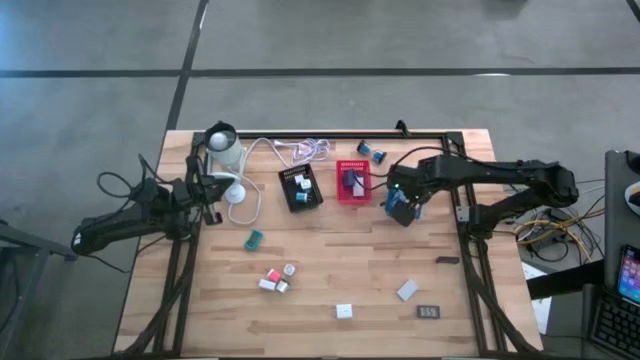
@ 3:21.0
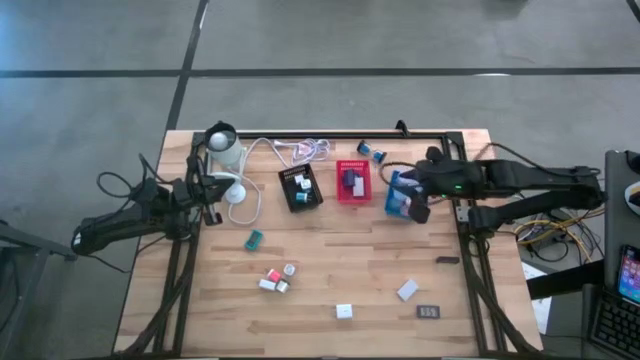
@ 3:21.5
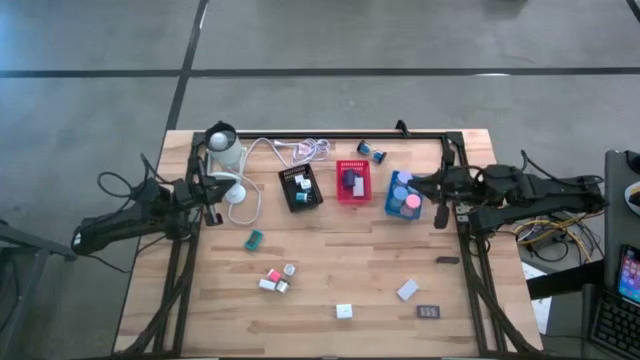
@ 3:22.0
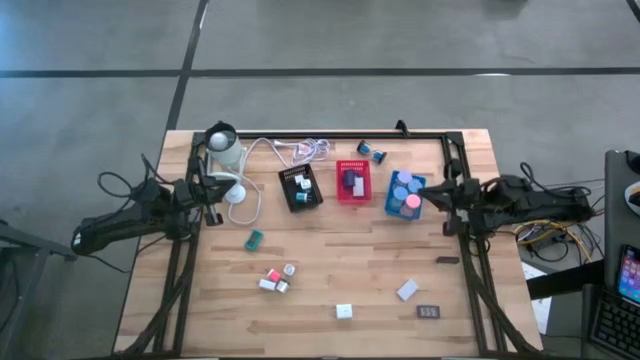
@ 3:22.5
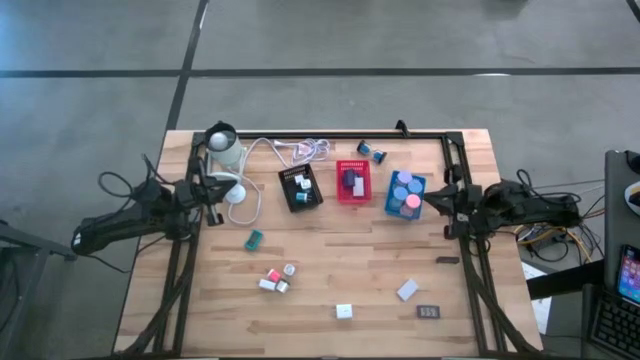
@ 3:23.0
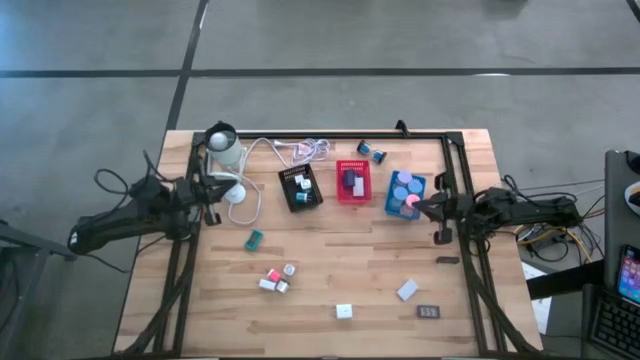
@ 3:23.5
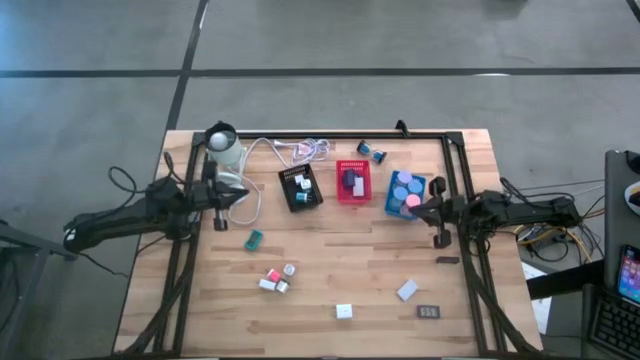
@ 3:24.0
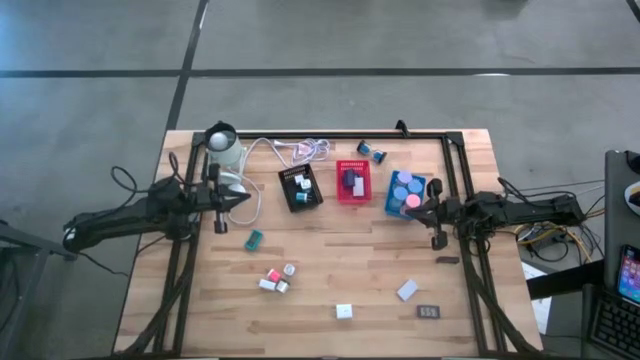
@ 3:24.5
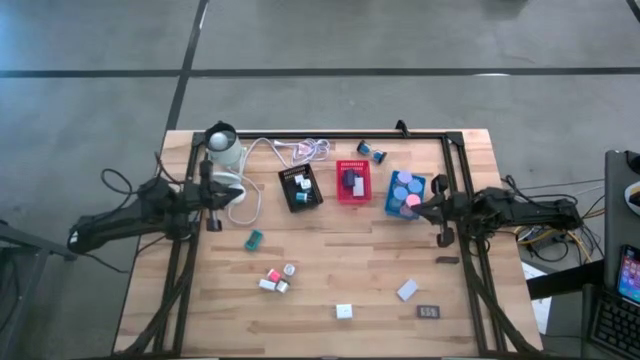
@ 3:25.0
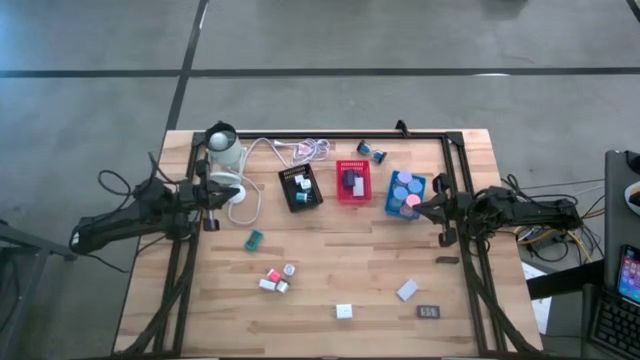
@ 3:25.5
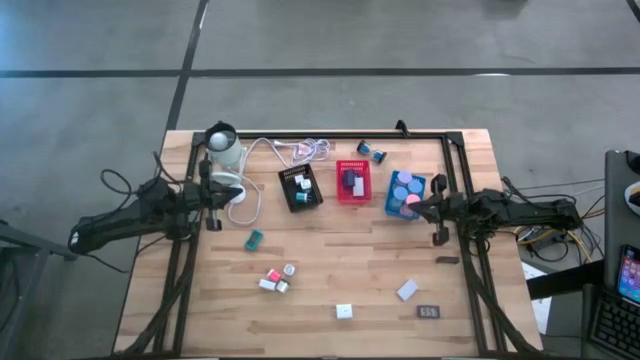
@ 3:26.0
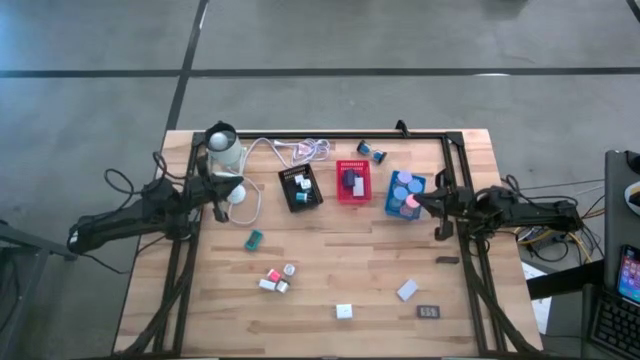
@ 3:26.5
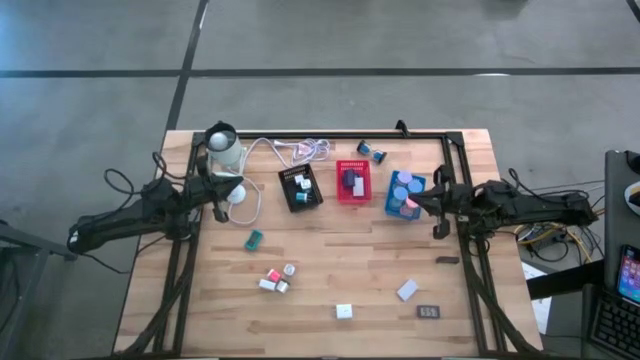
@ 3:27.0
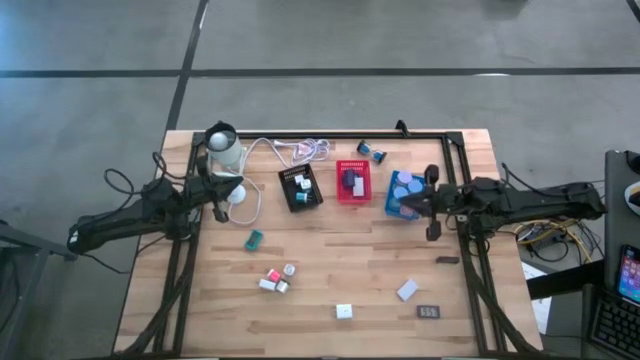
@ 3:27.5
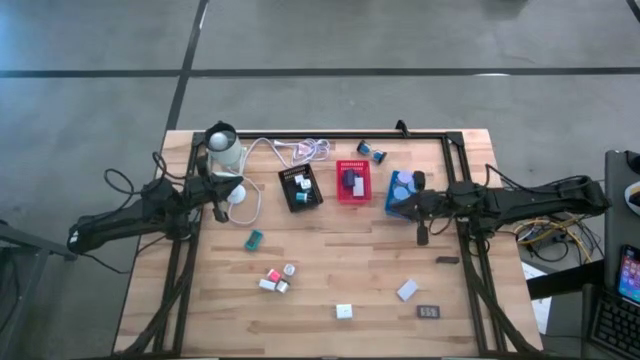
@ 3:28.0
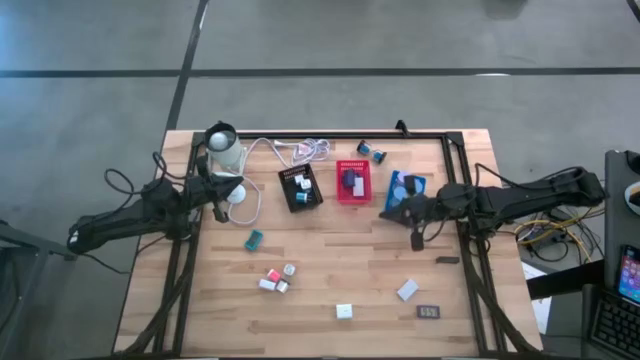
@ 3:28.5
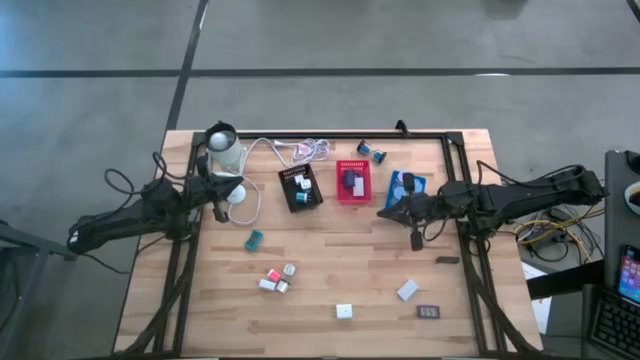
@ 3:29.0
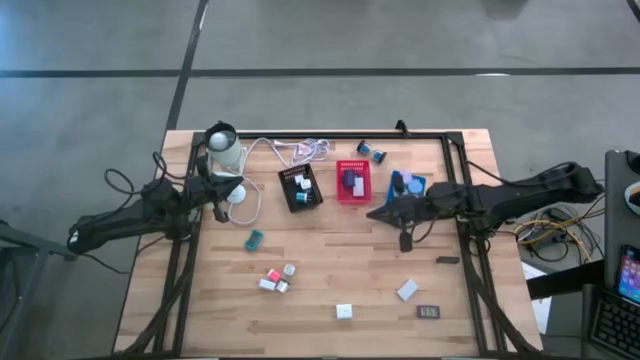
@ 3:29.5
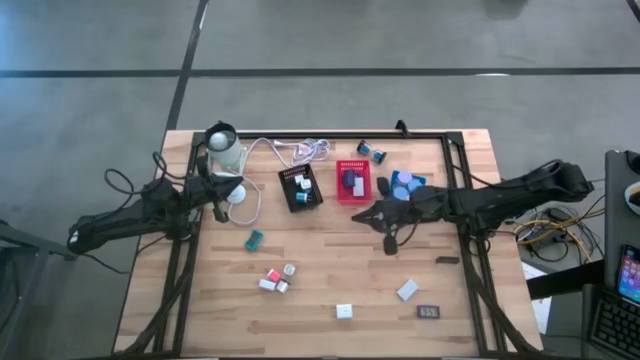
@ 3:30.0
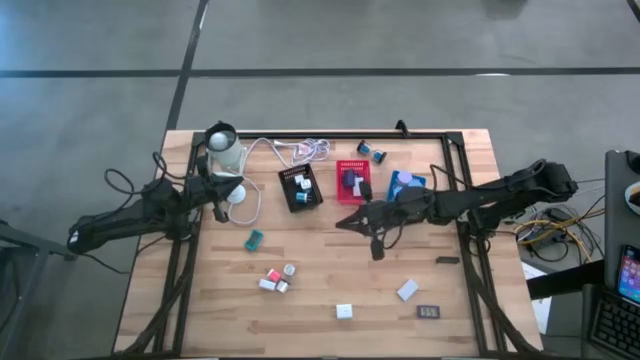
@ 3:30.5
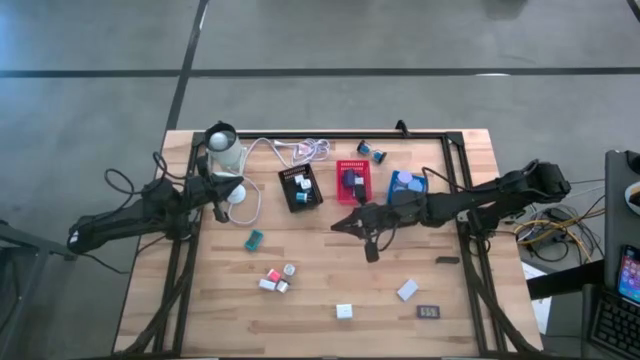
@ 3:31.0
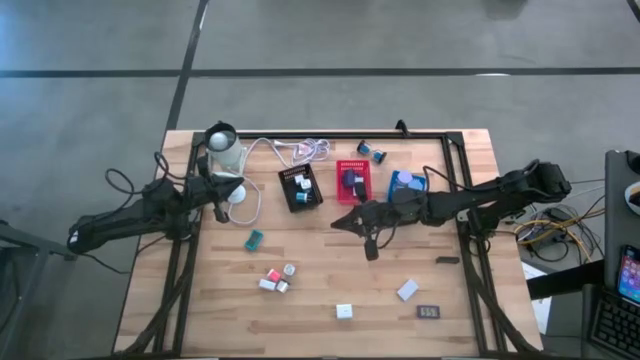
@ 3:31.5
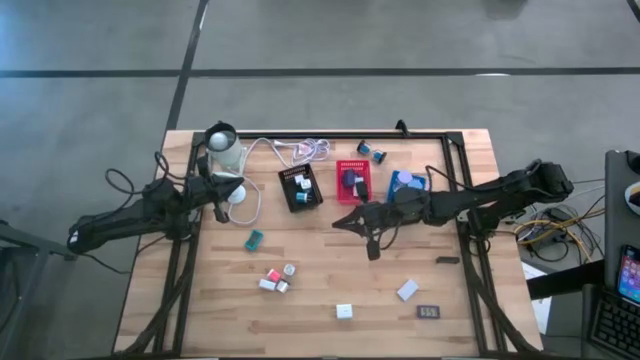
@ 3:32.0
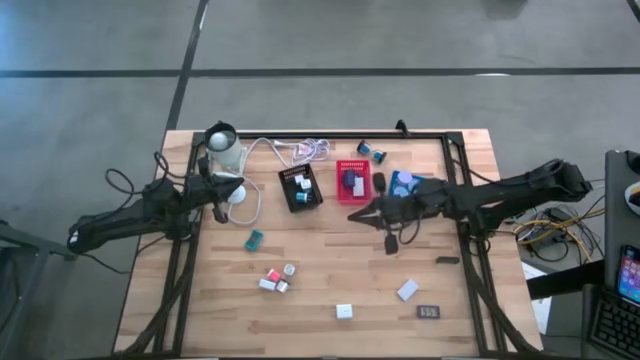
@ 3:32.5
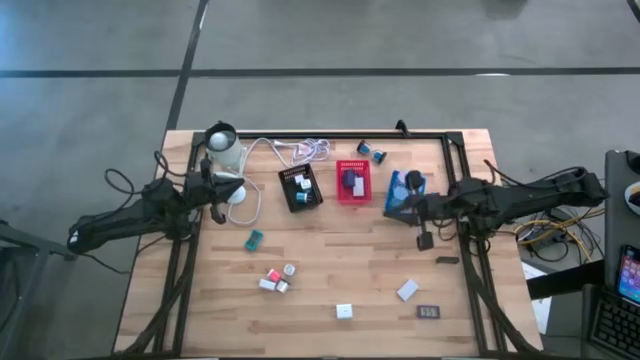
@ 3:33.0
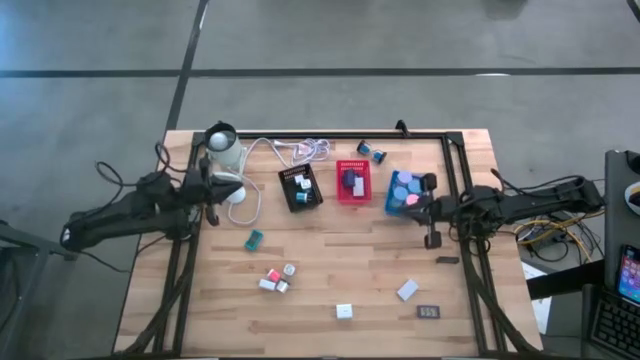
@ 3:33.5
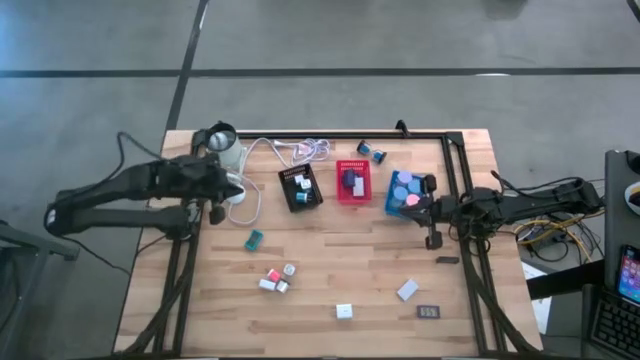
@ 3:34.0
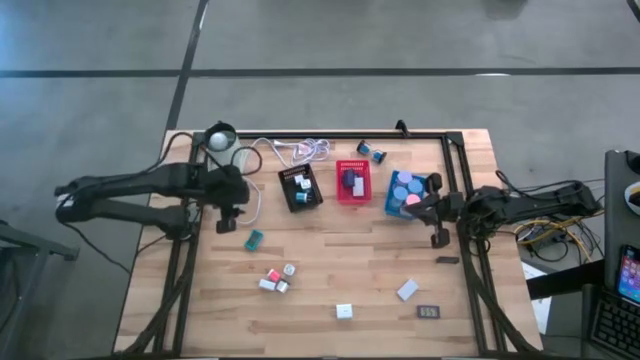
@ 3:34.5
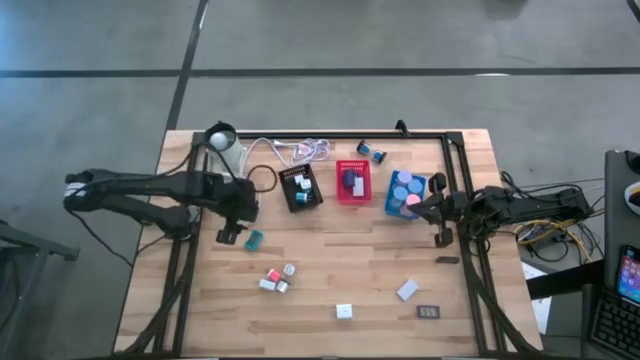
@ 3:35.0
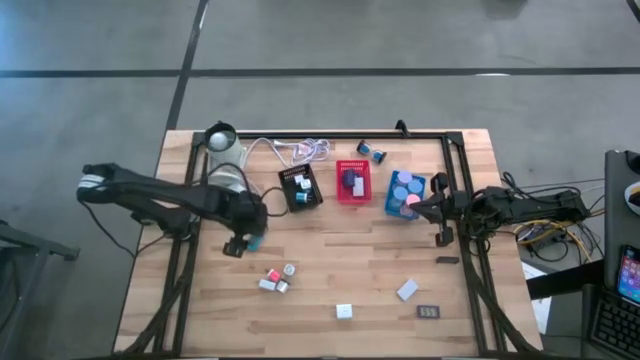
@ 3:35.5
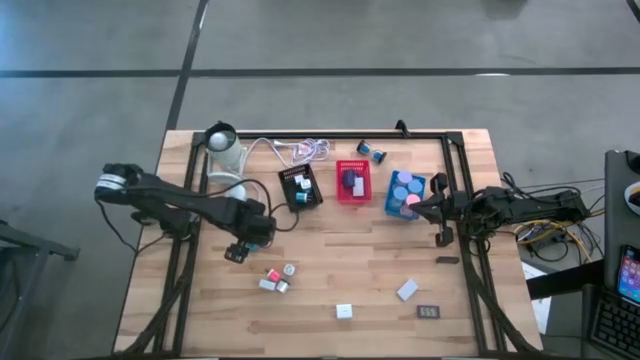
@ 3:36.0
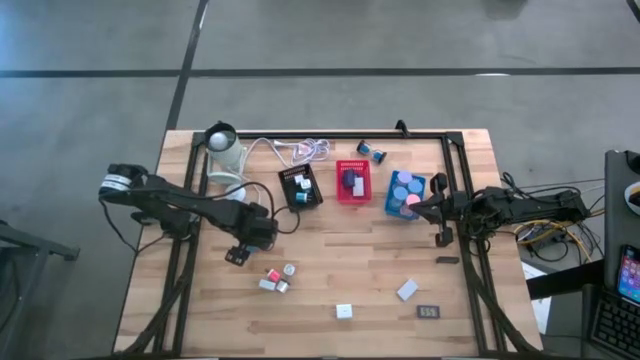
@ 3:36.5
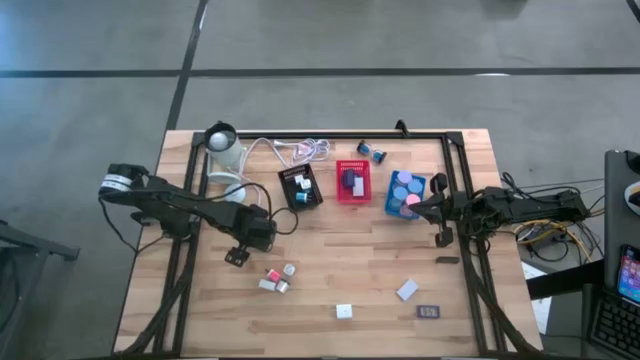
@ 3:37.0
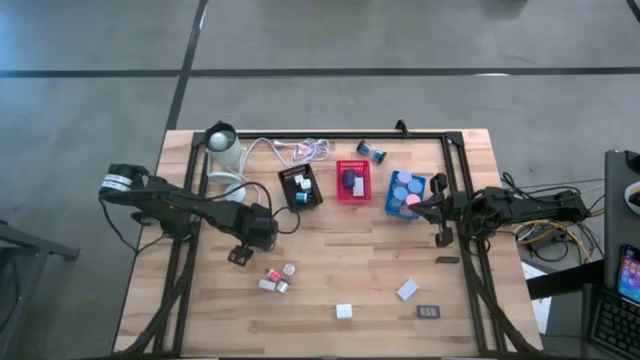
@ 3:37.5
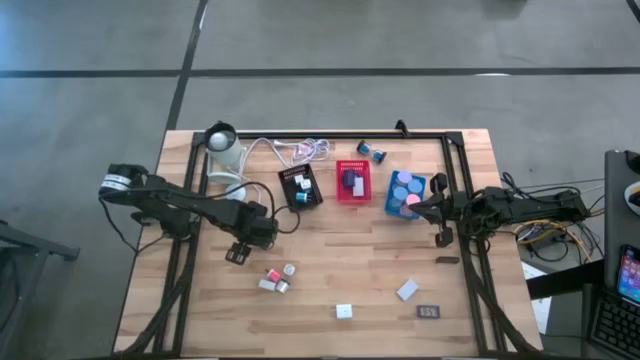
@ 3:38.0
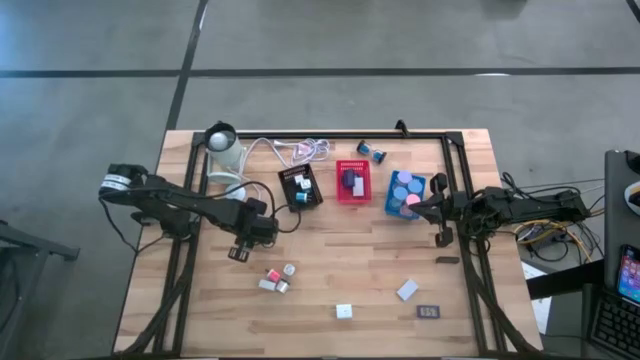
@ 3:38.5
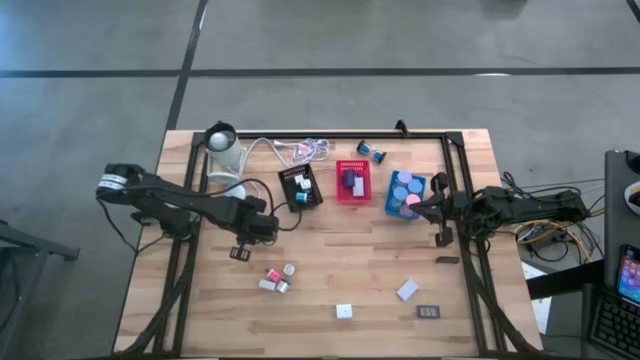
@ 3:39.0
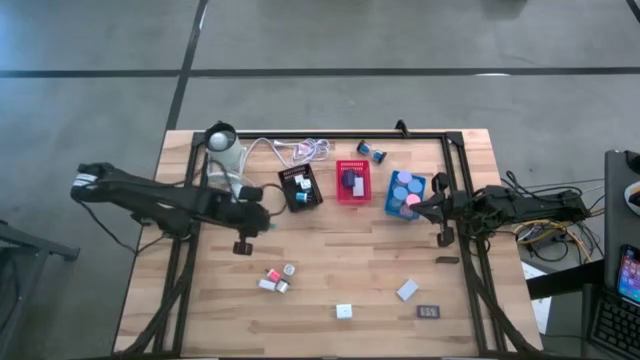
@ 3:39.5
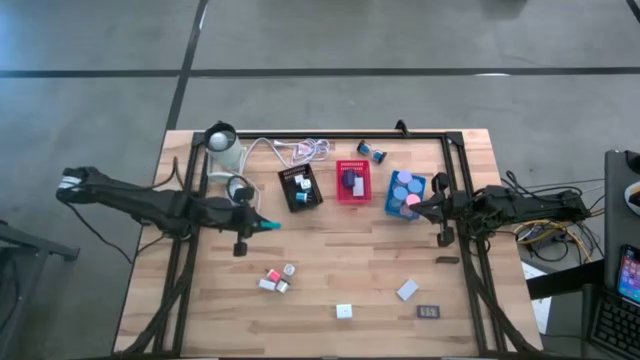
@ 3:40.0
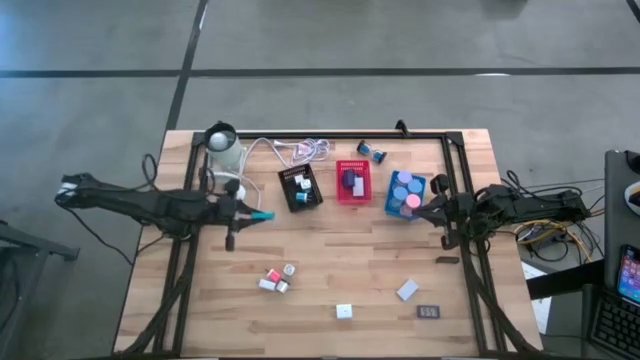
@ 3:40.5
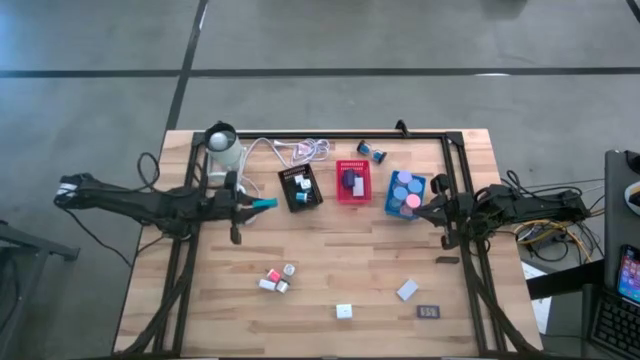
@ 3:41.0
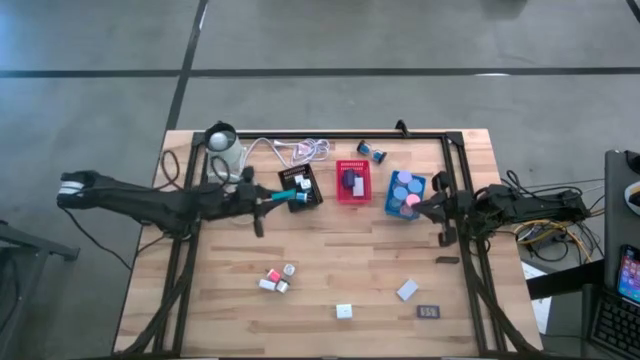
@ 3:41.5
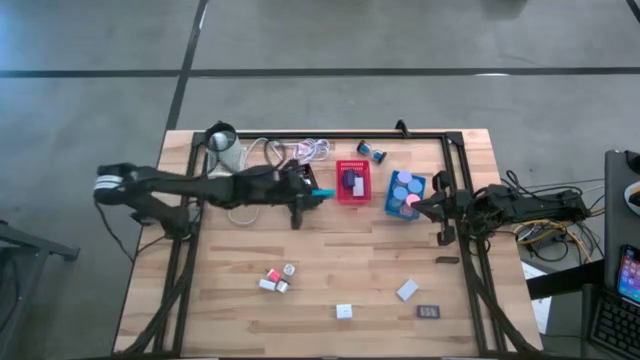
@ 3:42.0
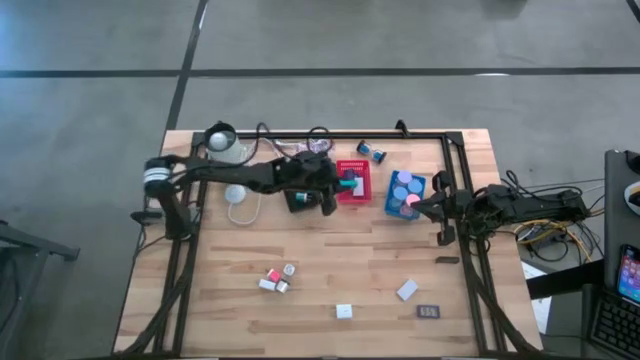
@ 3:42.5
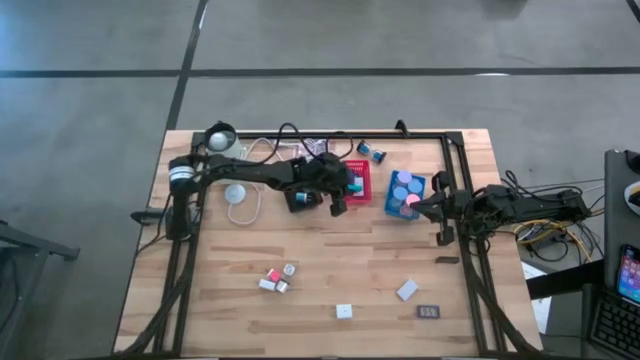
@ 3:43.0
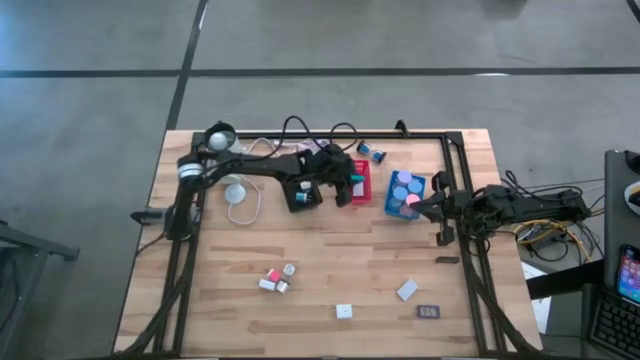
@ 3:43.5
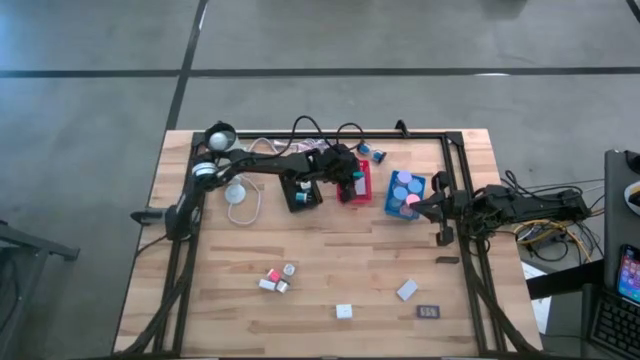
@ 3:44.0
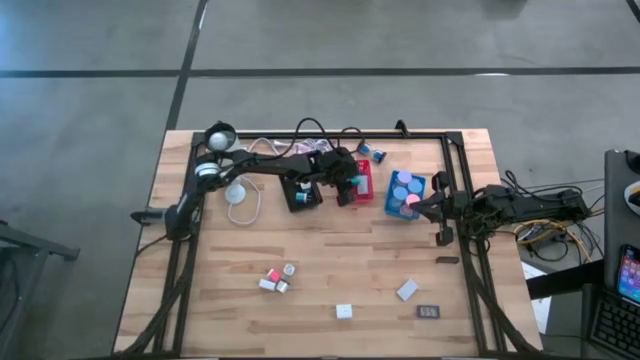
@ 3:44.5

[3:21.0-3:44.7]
Task: Pick & Place Office items
Put the light blue digital clock into the red bin
